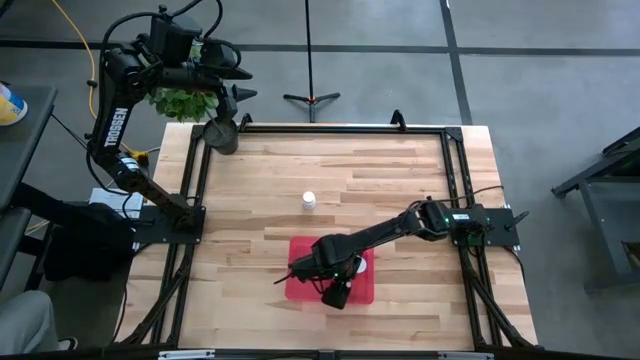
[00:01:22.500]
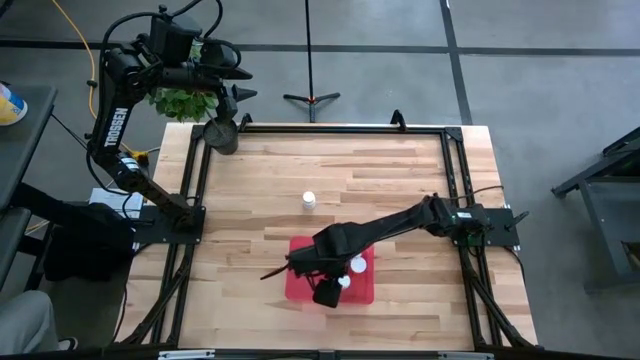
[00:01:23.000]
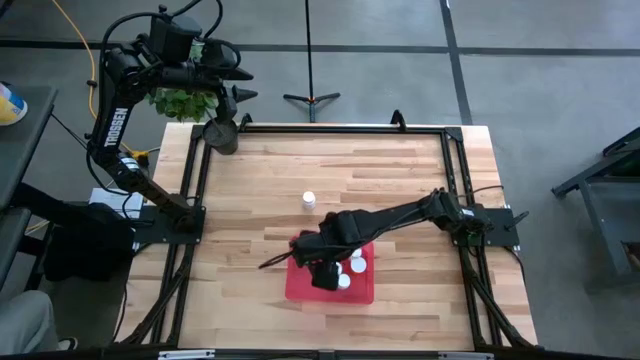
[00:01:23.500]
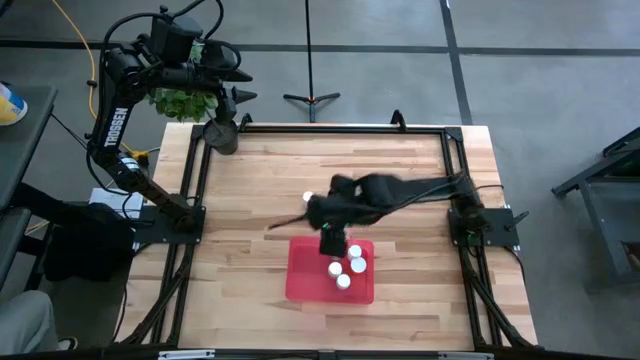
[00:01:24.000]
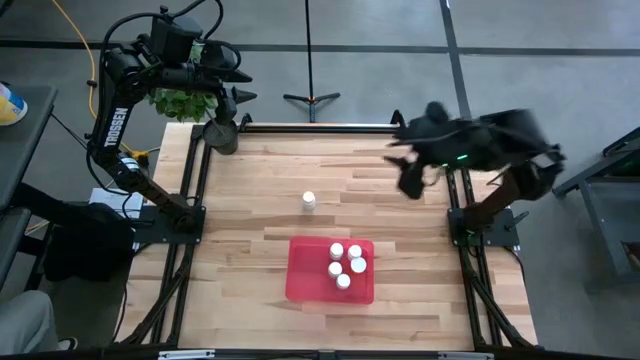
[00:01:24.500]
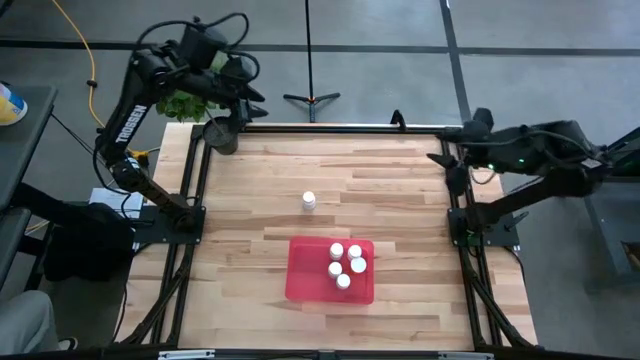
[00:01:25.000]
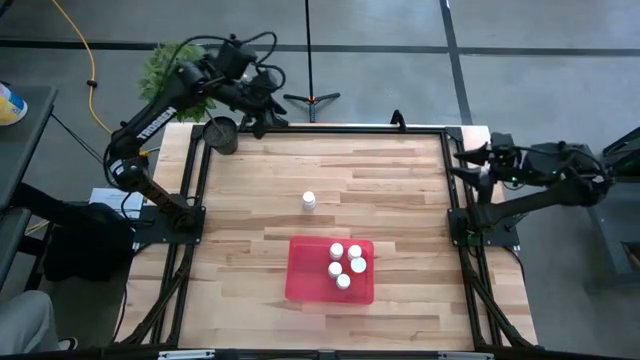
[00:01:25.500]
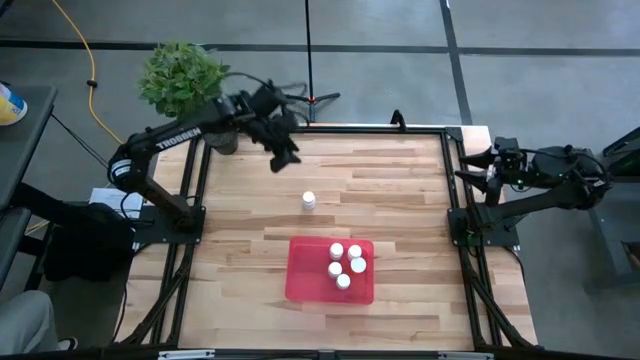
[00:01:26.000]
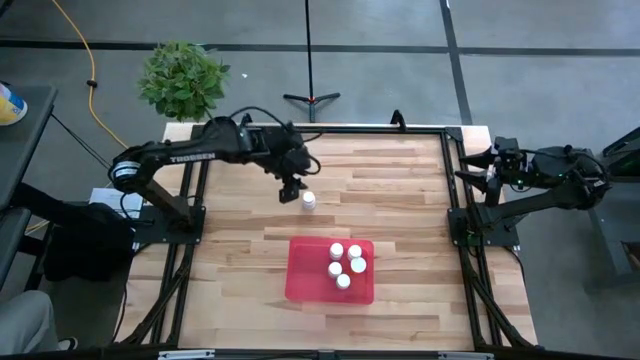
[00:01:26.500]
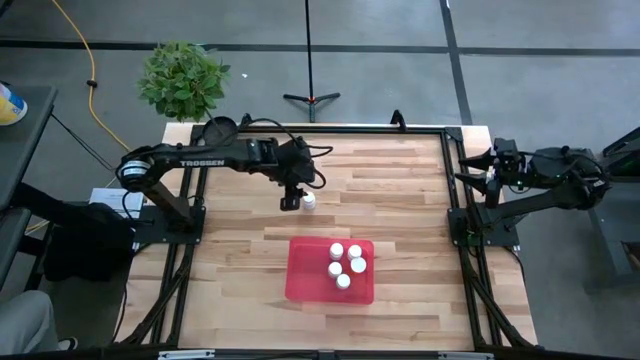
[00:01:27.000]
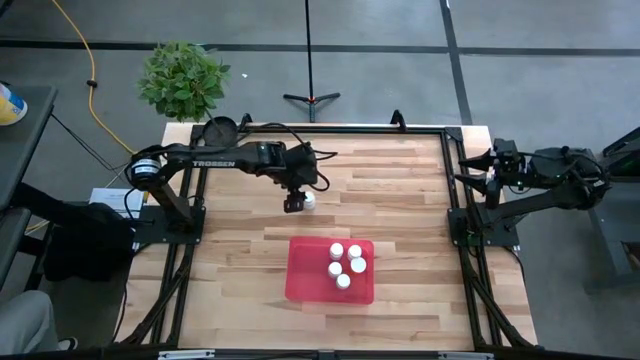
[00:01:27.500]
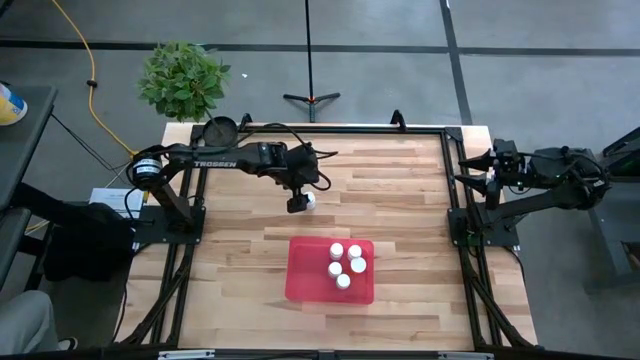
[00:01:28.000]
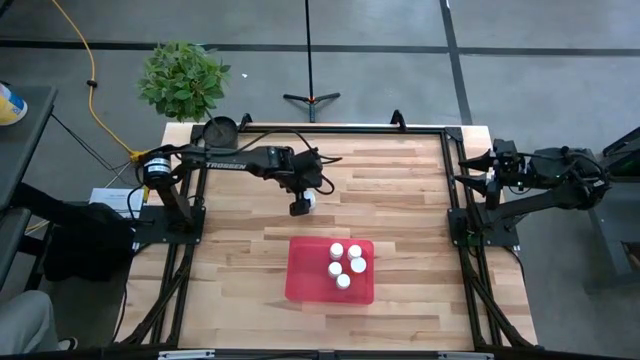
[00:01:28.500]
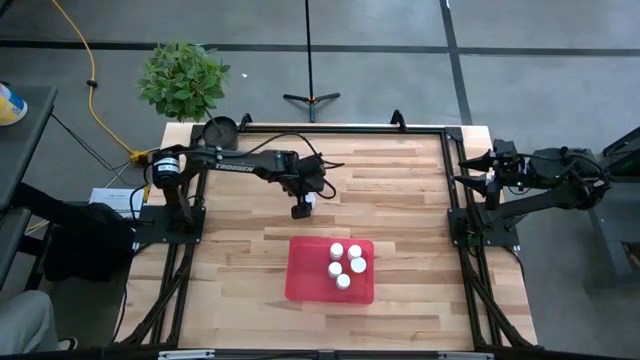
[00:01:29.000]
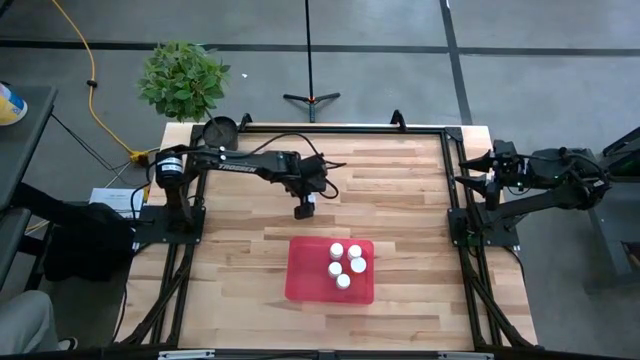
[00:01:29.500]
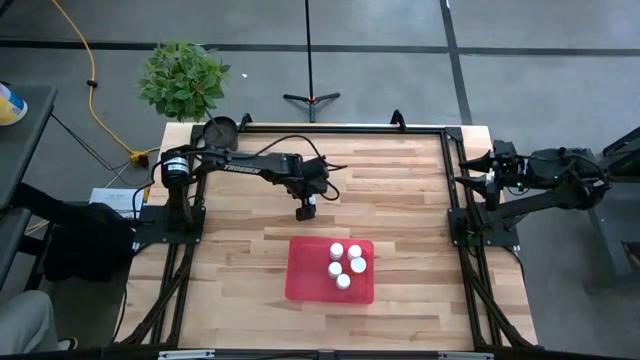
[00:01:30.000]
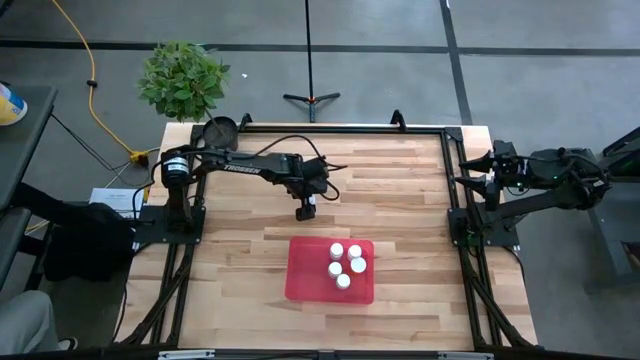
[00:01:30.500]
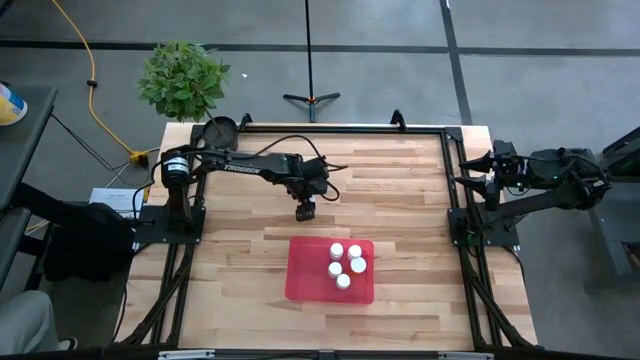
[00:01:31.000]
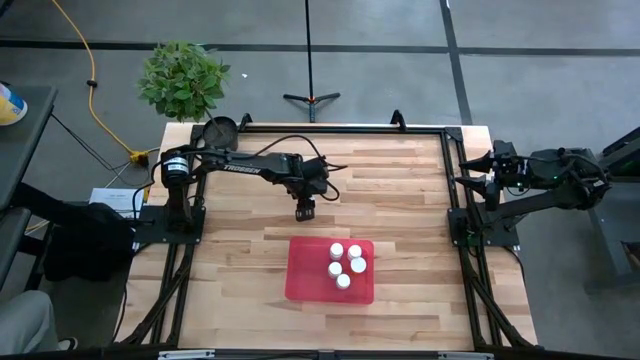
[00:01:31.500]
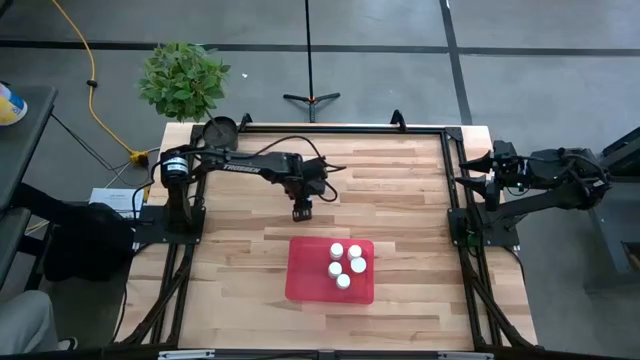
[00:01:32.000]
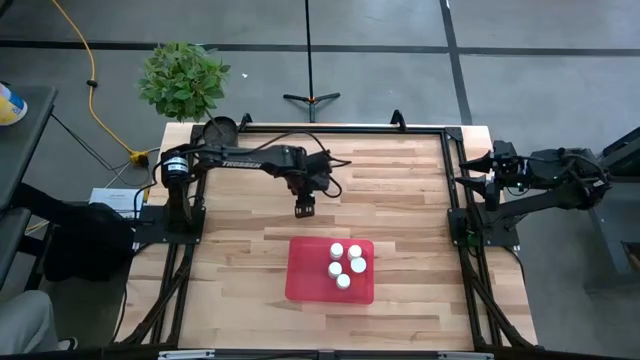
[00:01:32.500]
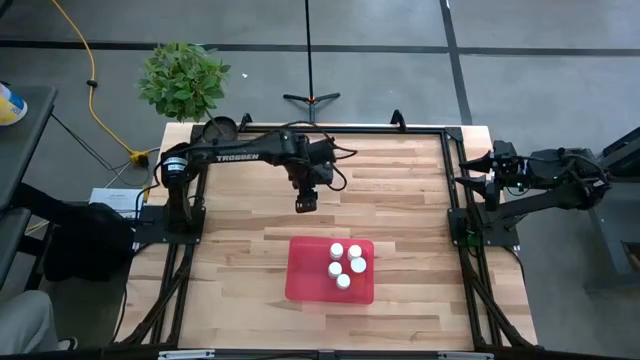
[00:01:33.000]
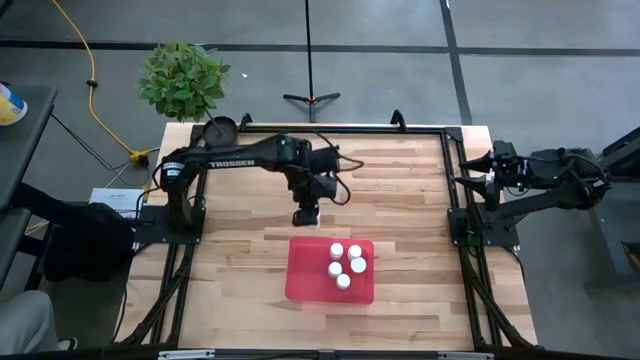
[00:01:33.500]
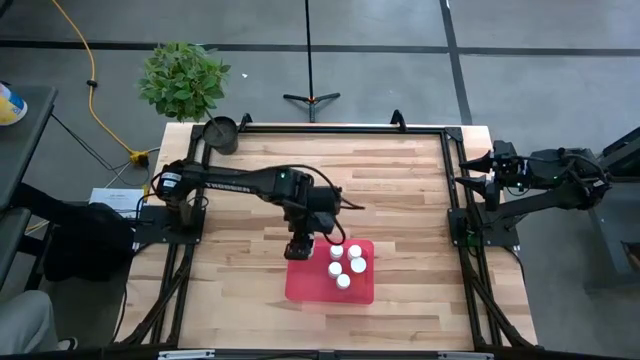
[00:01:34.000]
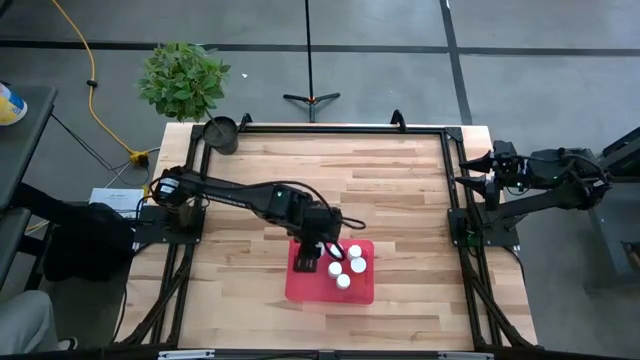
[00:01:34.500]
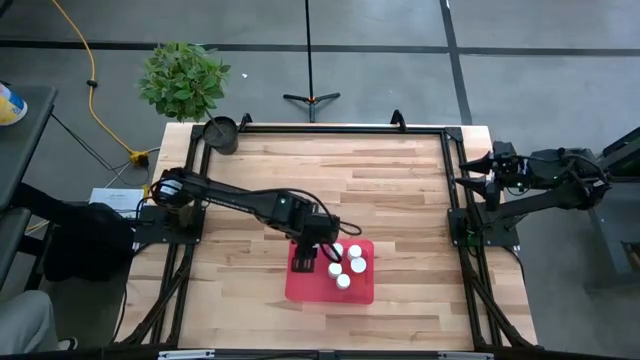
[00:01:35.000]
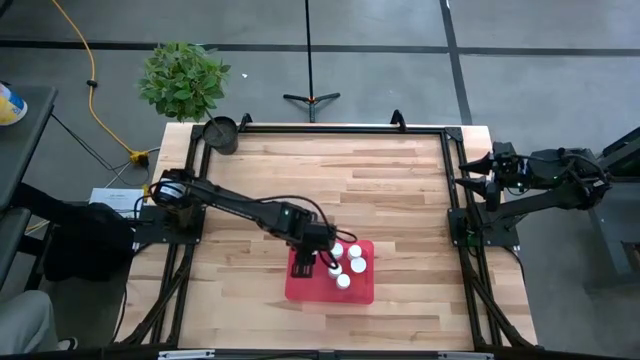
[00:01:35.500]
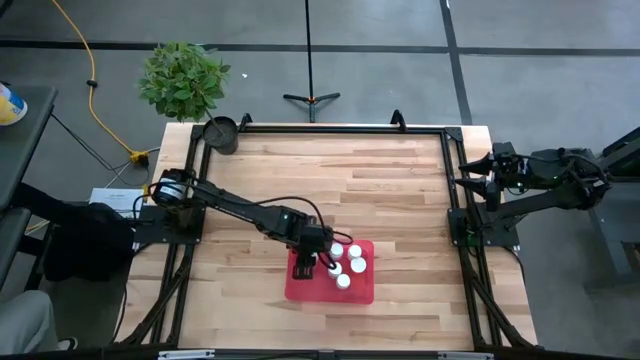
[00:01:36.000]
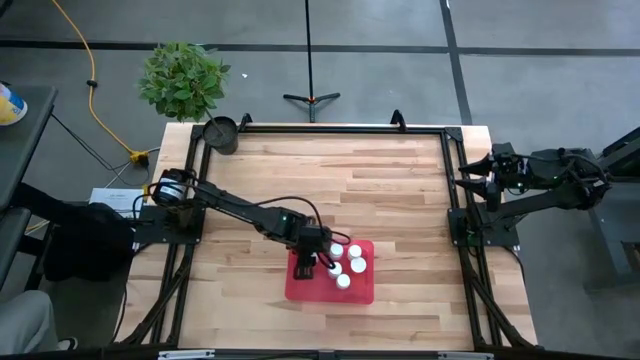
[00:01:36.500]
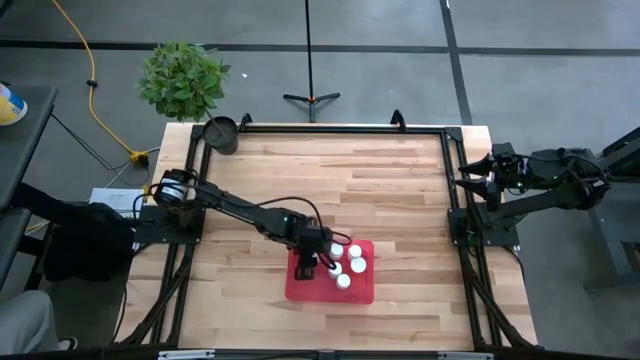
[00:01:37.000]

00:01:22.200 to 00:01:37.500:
Task: Pick and place pill bottles into a basket
Put the white pill bottle into the bin

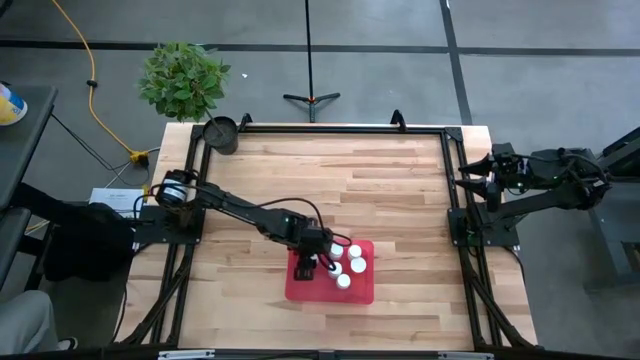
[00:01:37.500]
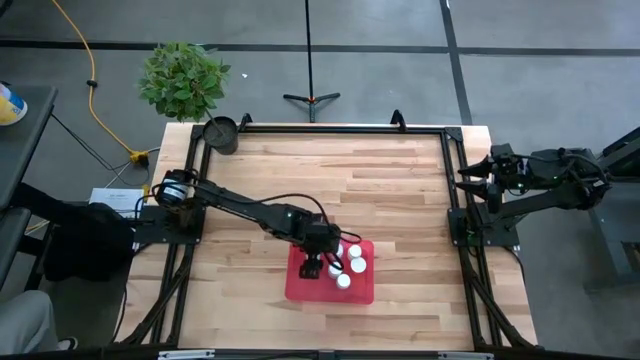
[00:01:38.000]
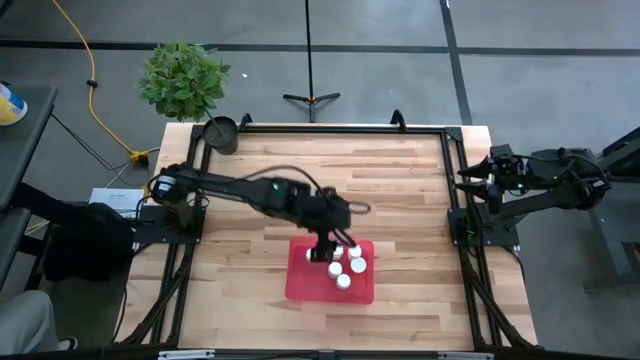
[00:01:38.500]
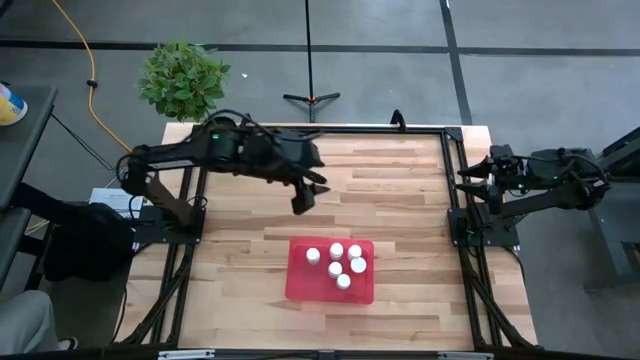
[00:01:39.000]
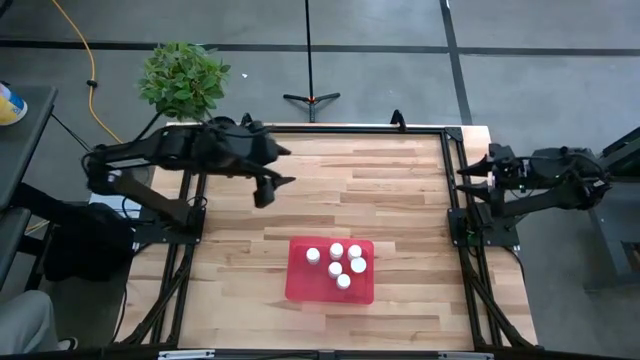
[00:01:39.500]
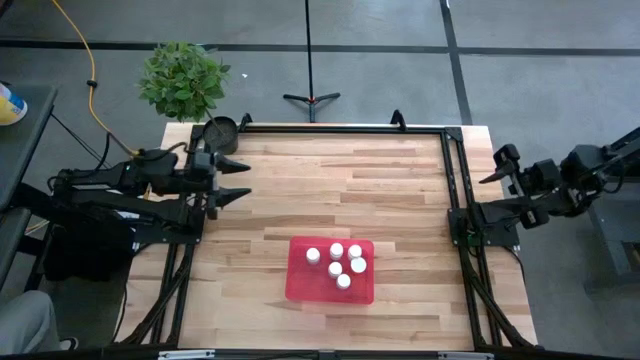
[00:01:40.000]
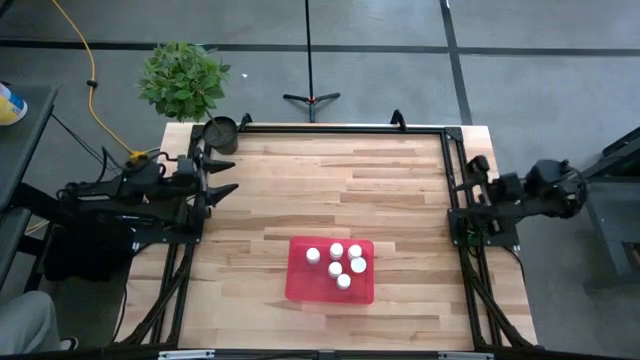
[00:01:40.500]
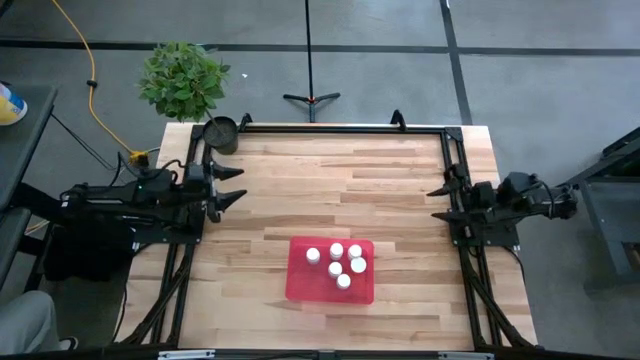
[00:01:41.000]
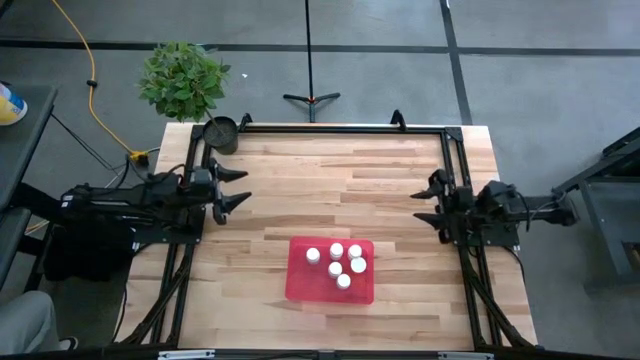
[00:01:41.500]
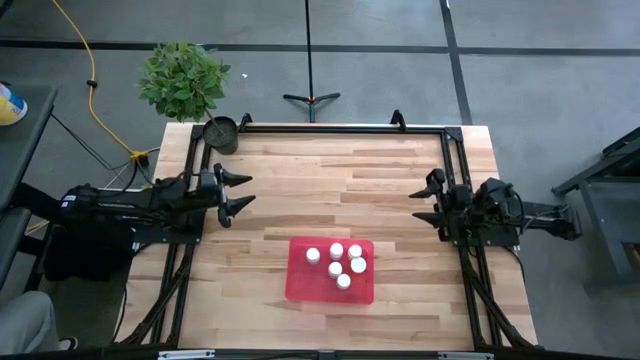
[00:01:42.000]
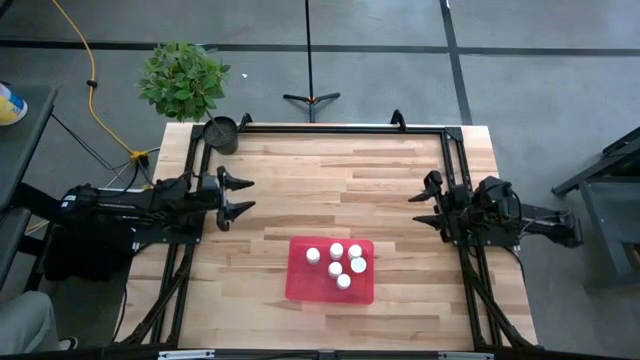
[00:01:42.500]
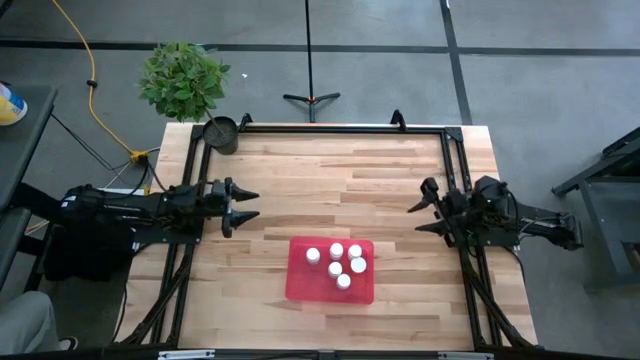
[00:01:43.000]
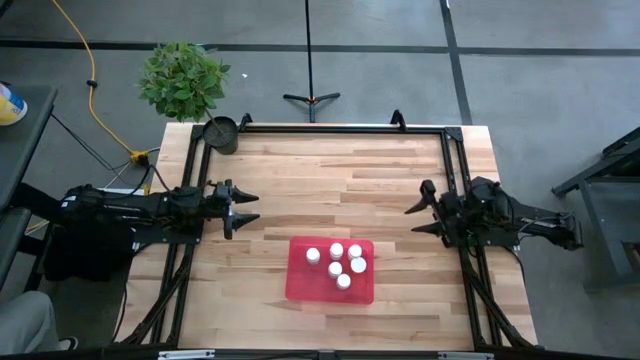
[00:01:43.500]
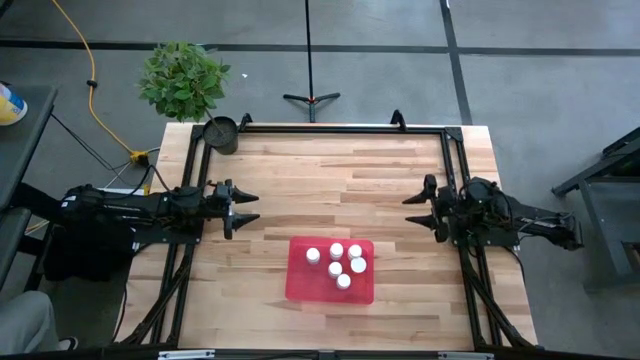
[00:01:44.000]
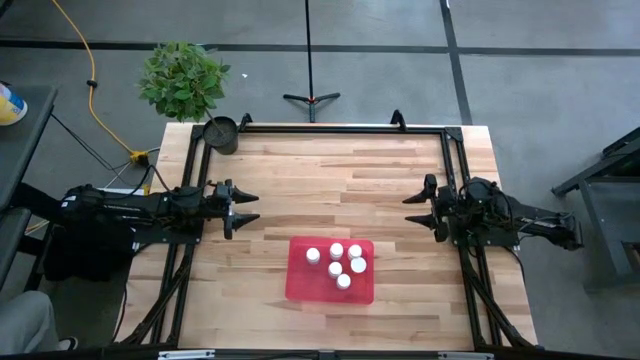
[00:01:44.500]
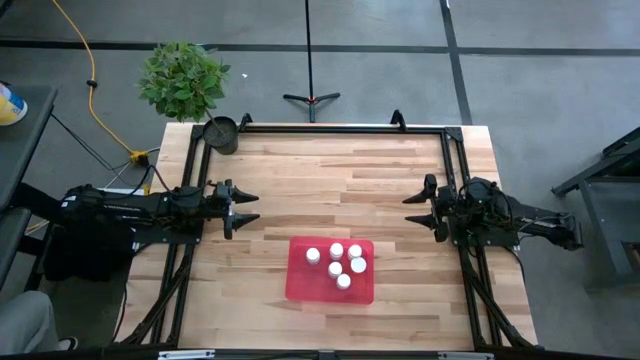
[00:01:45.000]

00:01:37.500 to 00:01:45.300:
Return to Home Position
